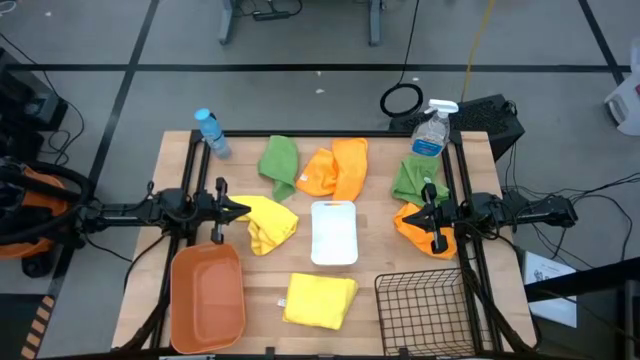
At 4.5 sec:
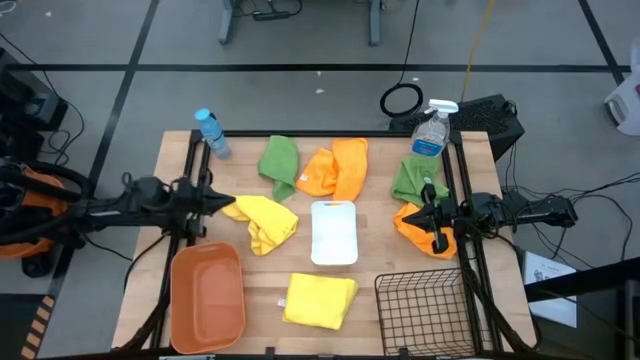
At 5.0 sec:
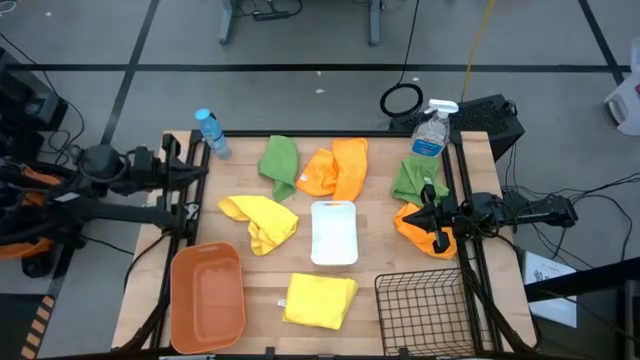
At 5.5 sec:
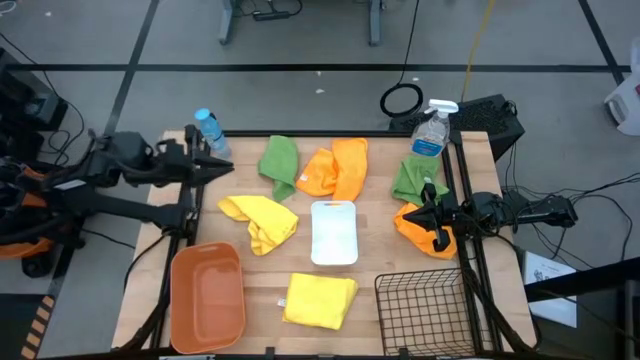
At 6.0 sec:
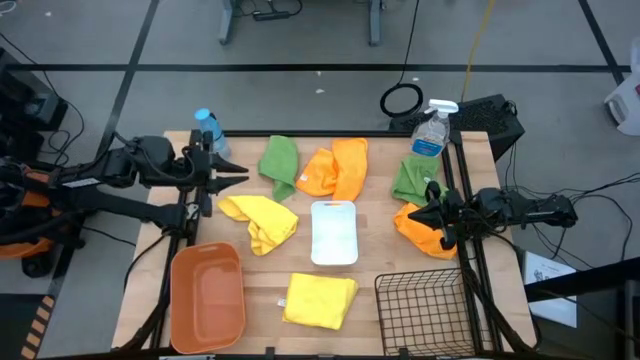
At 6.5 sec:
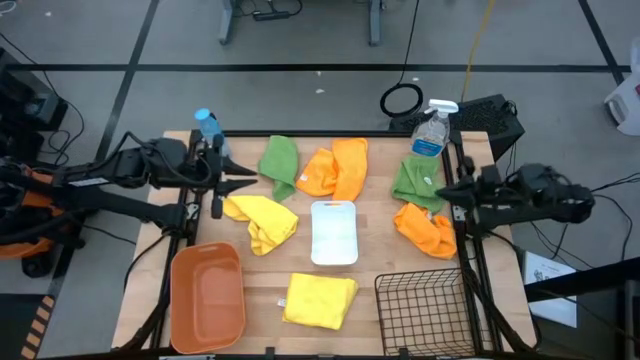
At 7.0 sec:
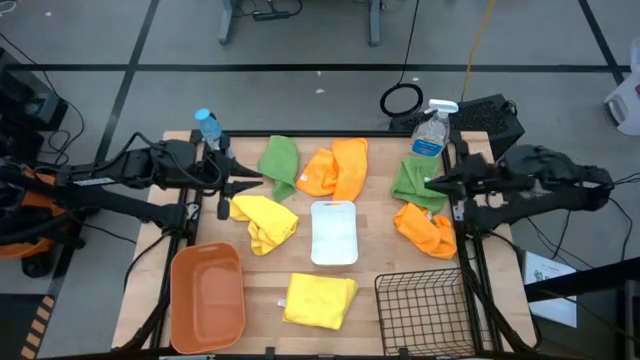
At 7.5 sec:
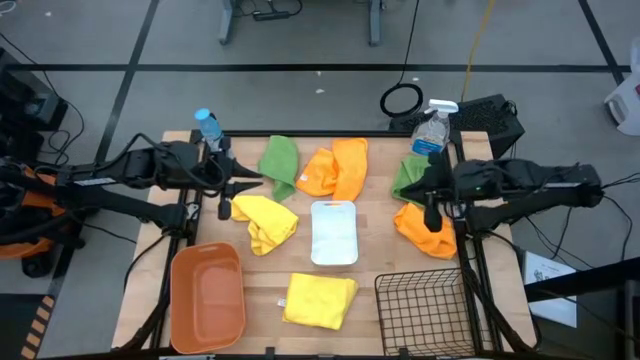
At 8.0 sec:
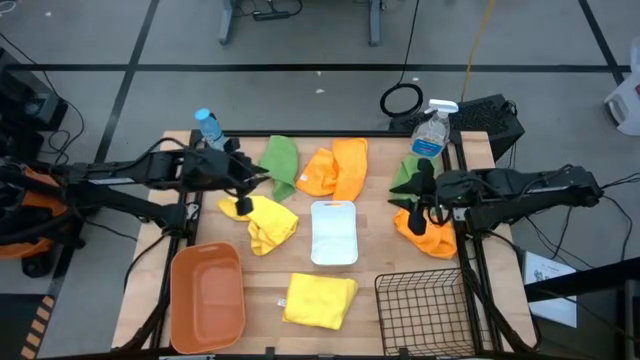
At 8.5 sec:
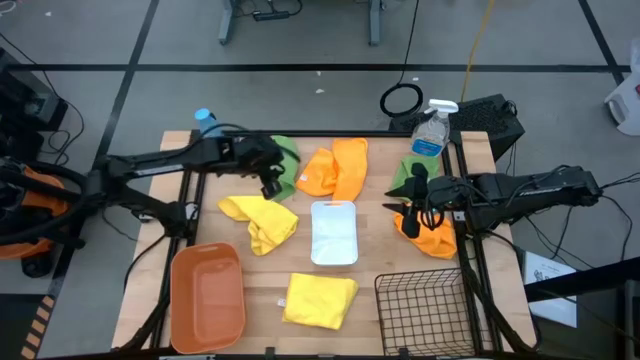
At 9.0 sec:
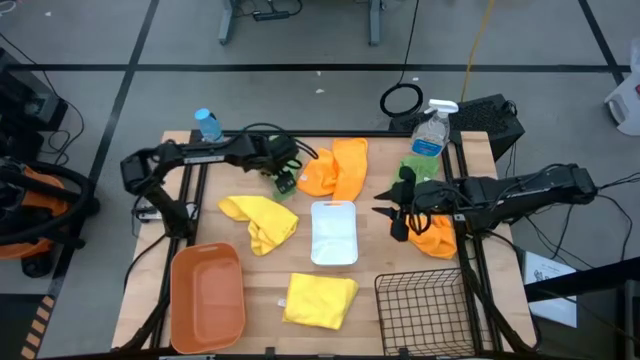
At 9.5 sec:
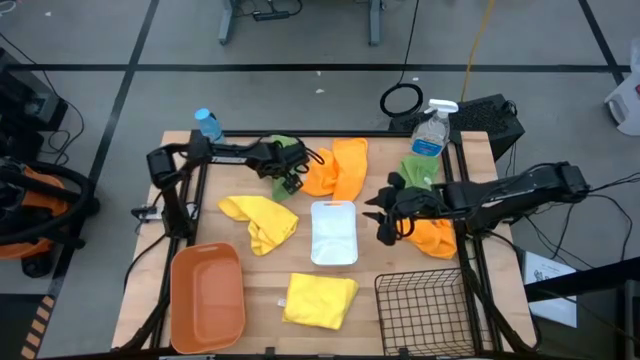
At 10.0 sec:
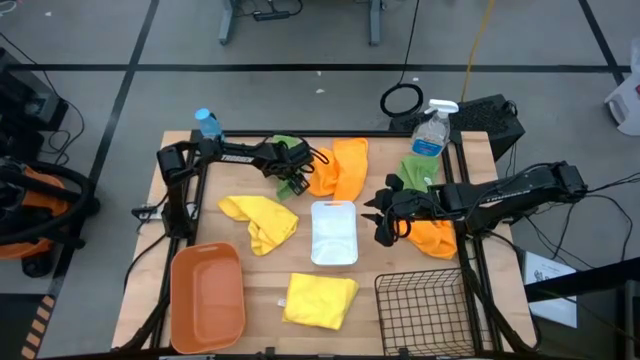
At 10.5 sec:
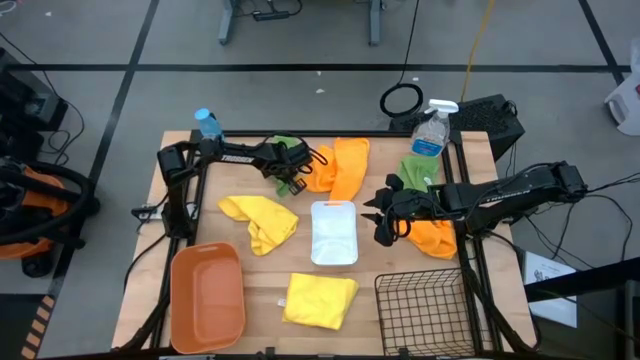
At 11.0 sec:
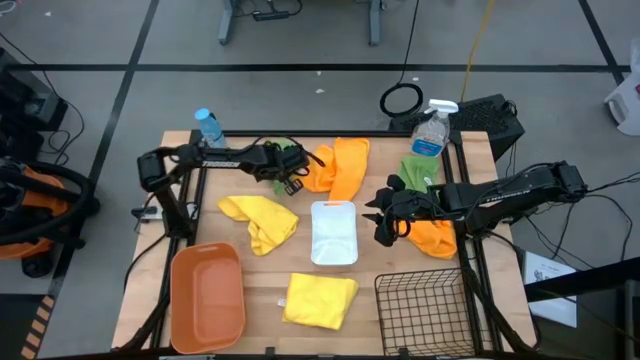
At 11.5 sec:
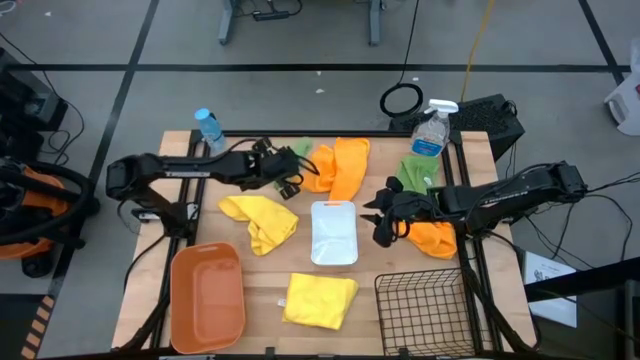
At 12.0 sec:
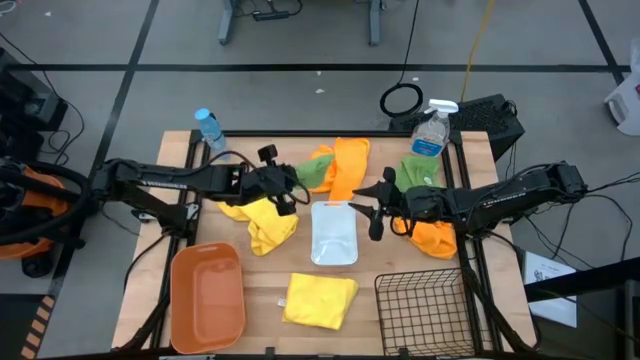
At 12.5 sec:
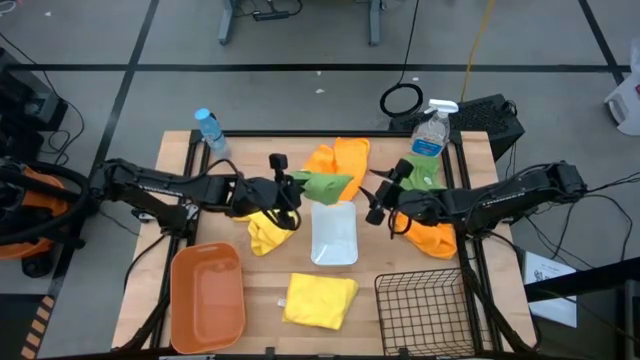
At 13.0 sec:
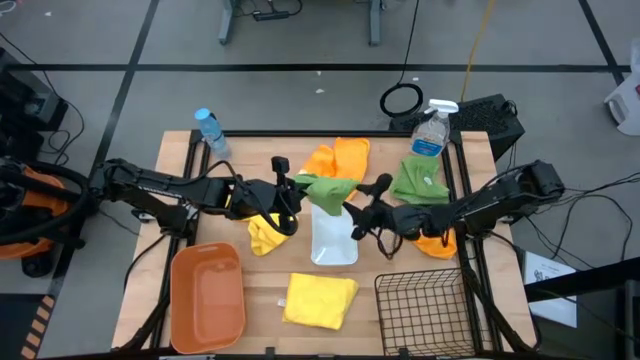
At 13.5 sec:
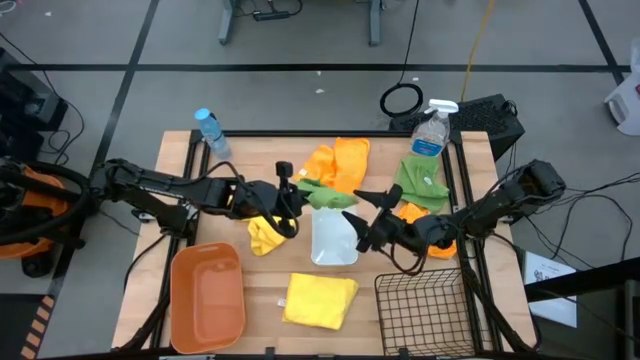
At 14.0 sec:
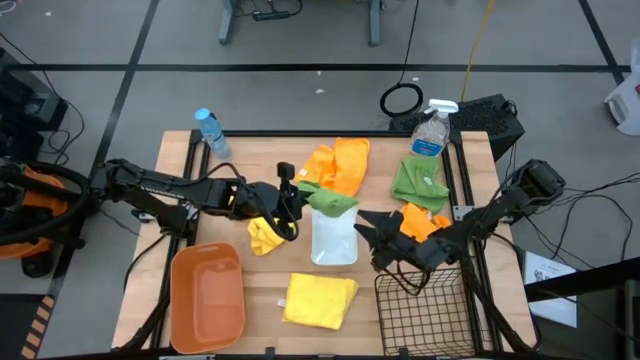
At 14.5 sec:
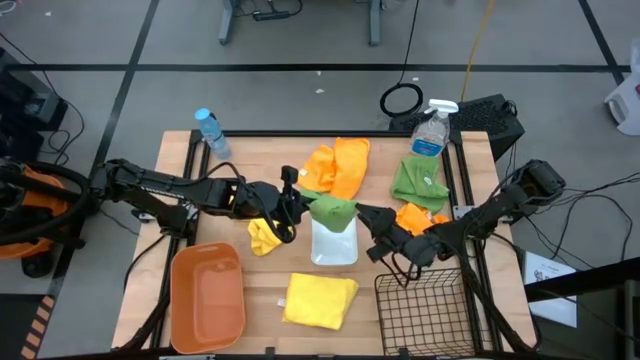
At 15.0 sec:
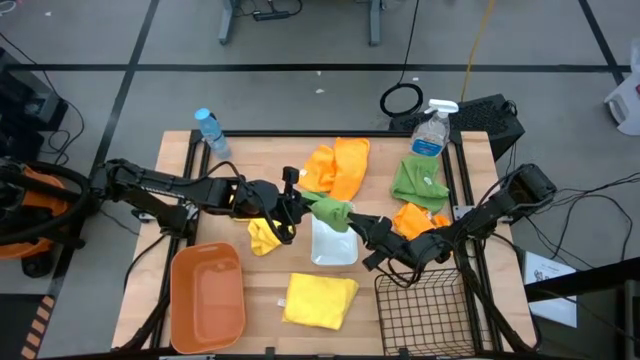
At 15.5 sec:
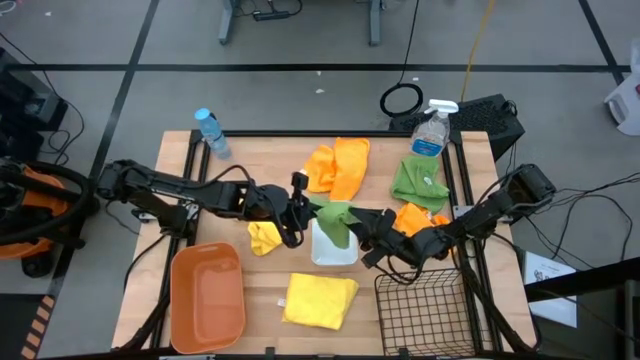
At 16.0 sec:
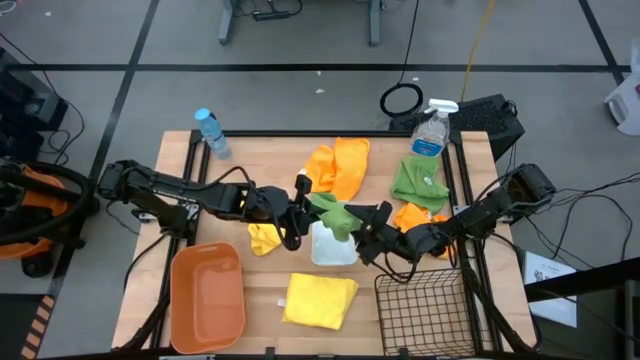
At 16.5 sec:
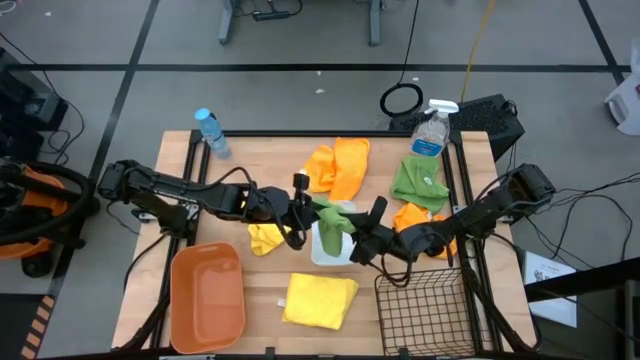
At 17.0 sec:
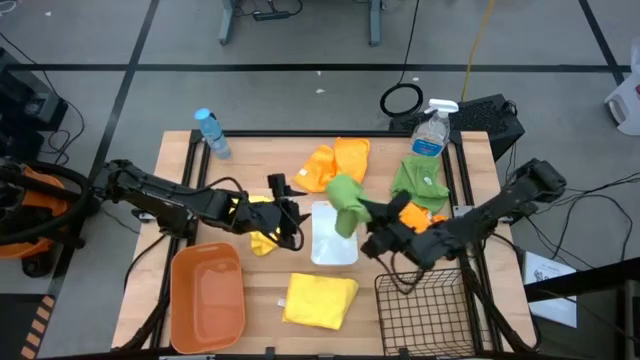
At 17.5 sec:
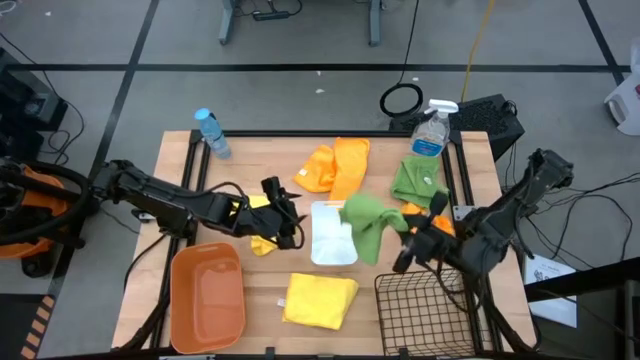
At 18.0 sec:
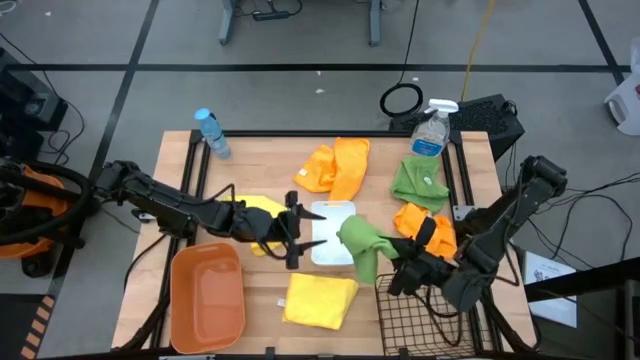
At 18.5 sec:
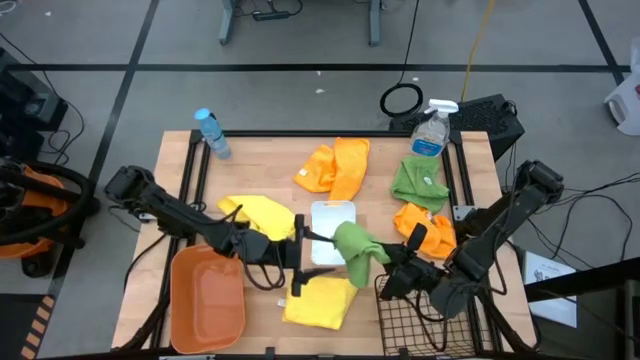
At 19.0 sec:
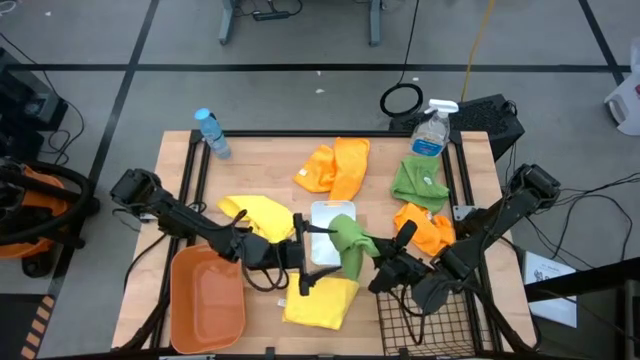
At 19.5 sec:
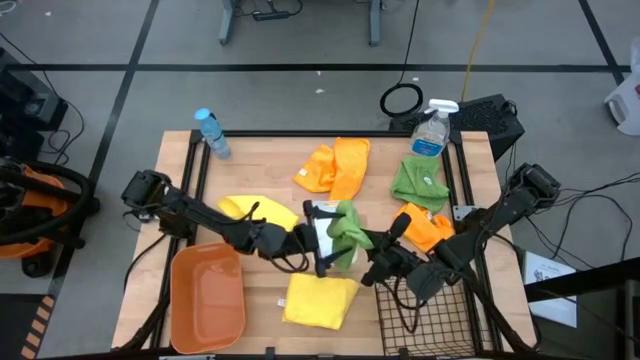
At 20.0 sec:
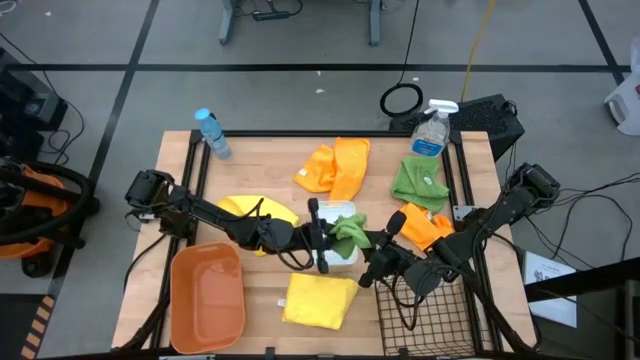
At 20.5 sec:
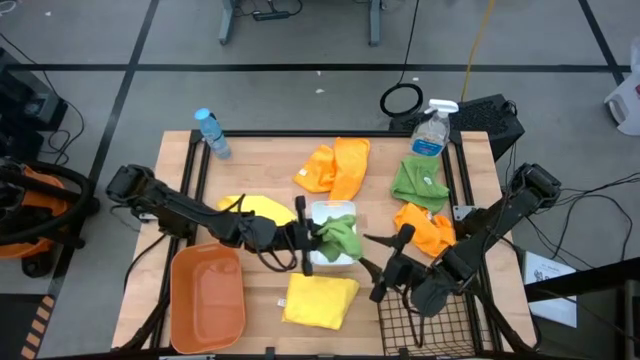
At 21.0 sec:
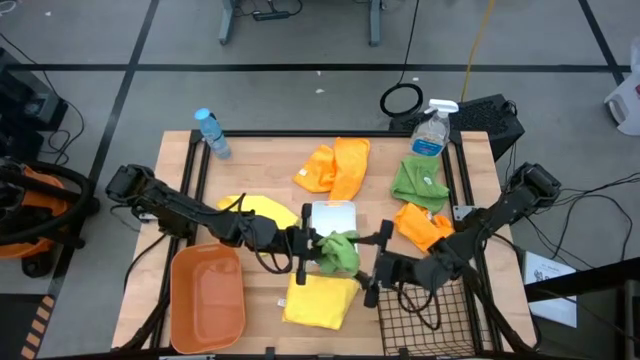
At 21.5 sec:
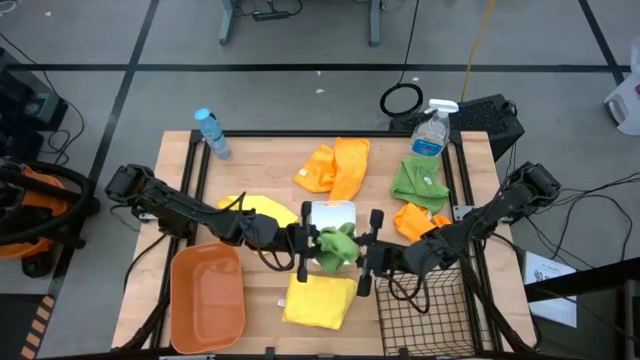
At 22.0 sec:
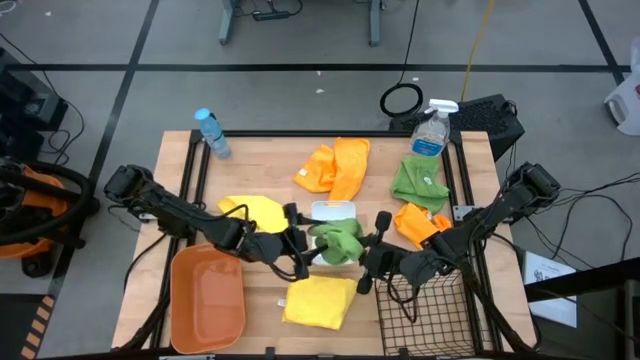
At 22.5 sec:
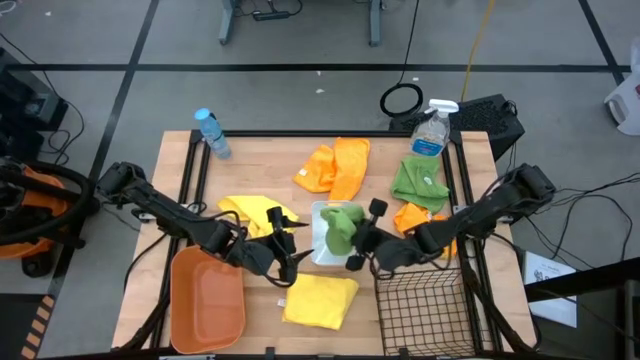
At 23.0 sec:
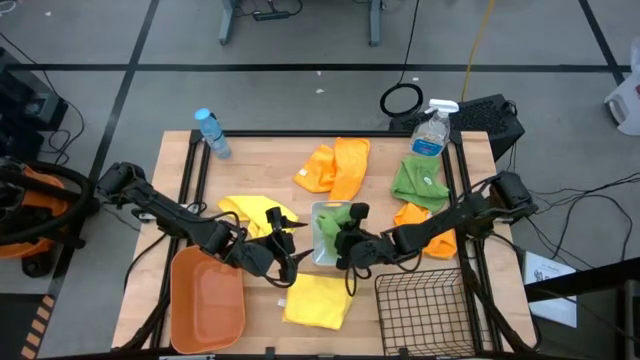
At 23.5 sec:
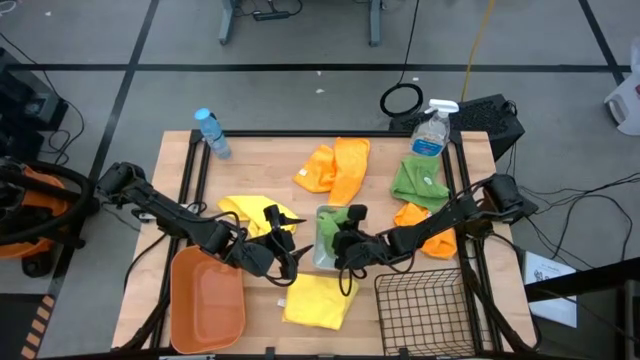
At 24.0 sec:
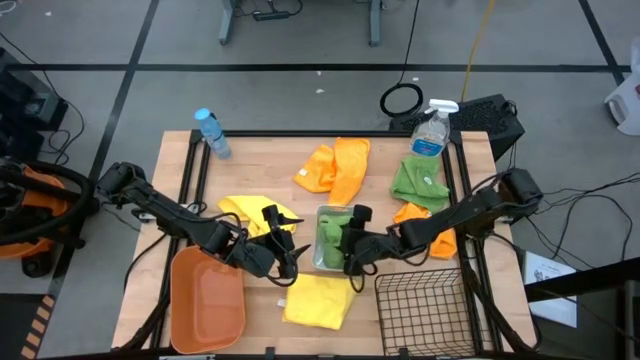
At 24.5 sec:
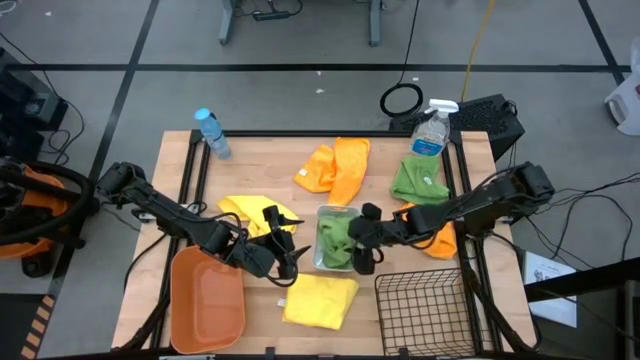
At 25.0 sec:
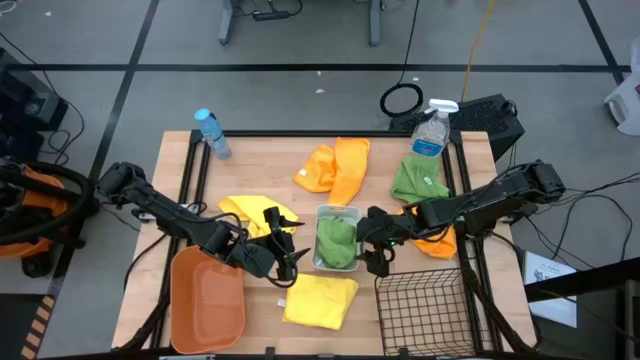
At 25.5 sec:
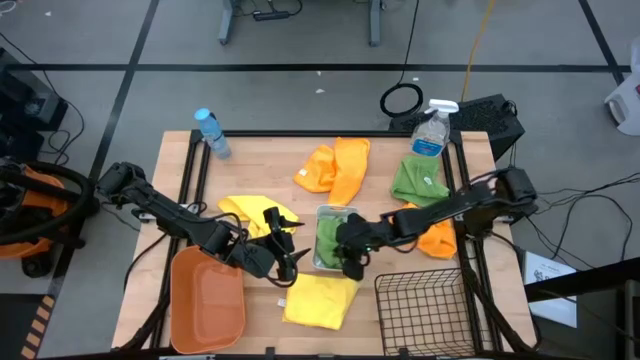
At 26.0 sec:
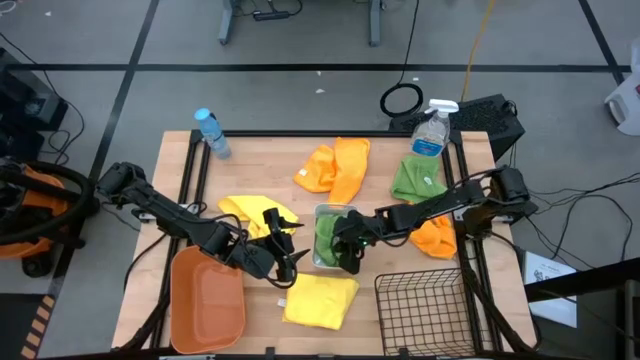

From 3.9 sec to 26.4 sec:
Task: Sort microfiber towel by color & place in baskets
Put the left green microfiber towel into the white bin
